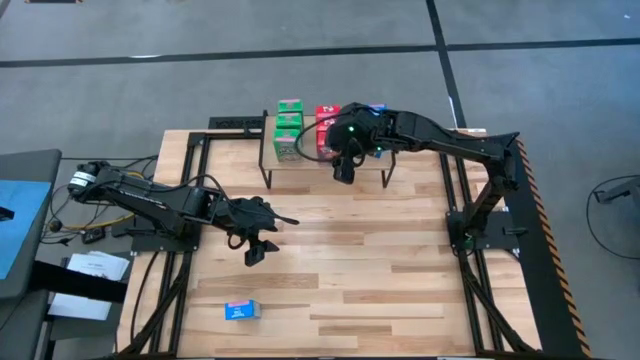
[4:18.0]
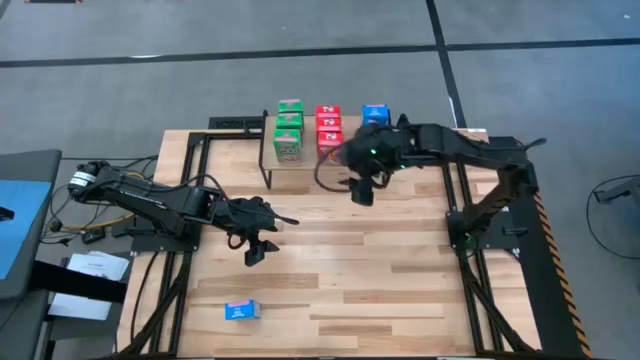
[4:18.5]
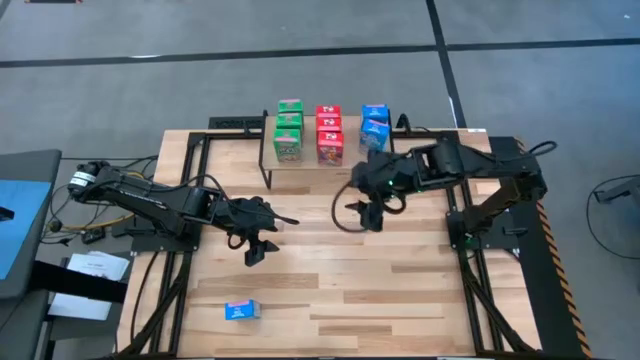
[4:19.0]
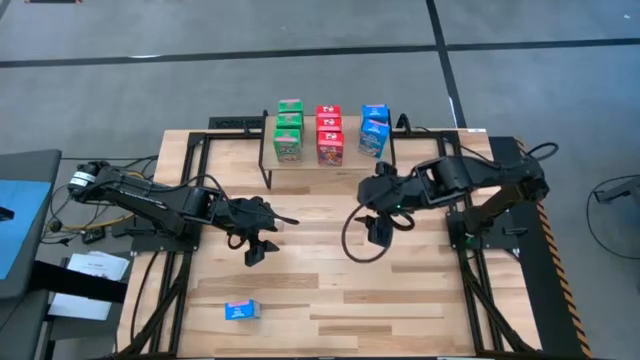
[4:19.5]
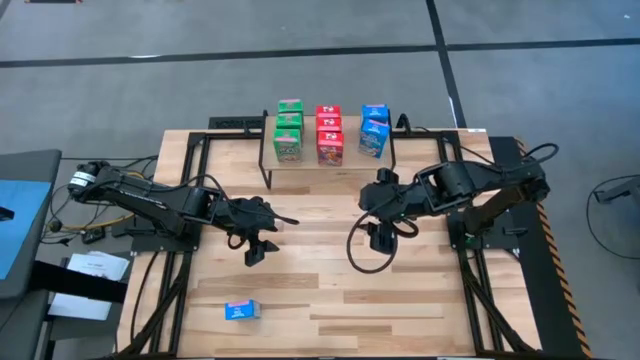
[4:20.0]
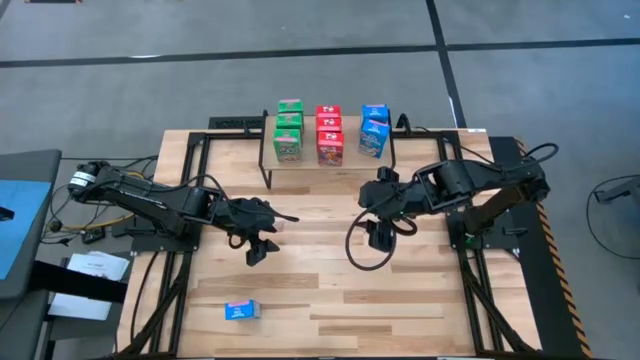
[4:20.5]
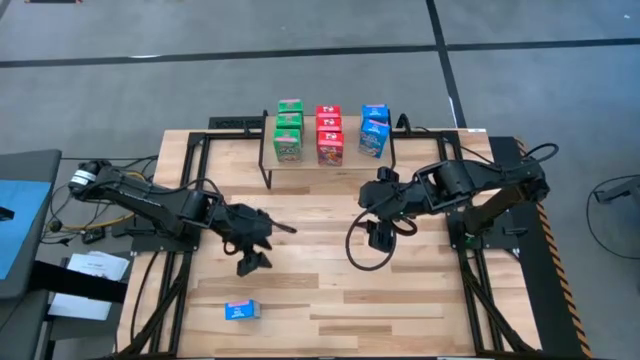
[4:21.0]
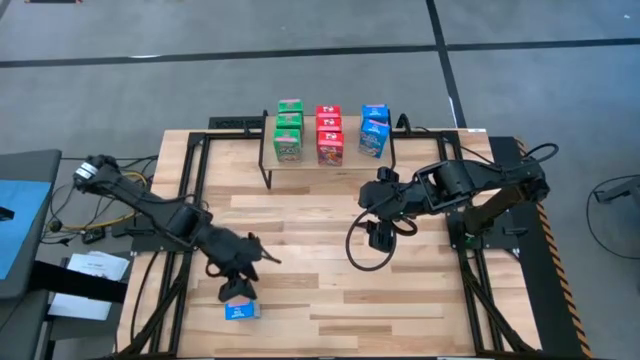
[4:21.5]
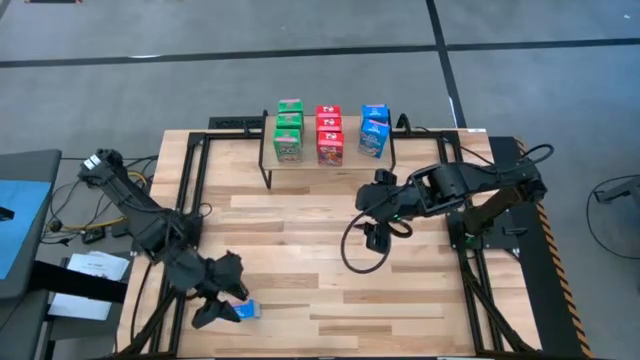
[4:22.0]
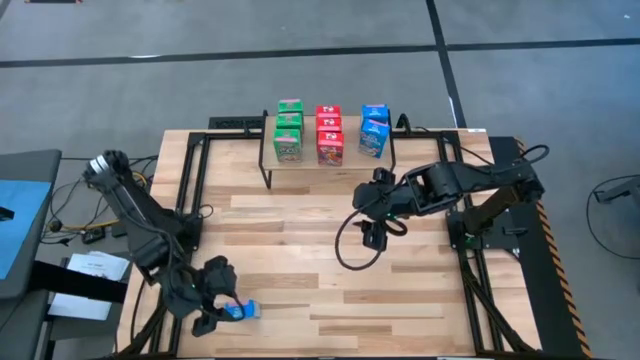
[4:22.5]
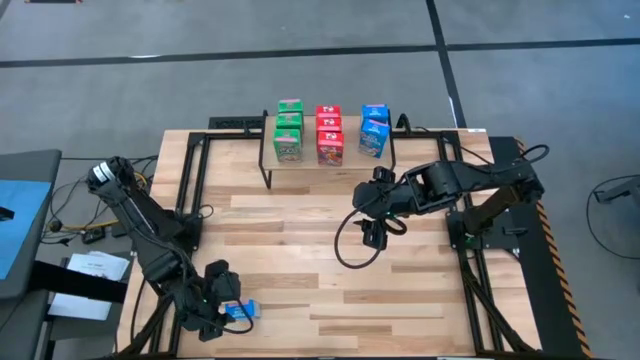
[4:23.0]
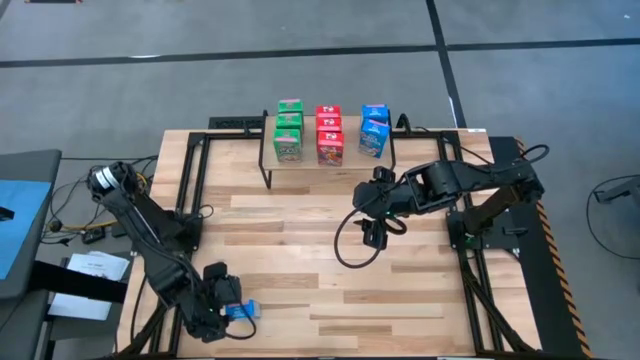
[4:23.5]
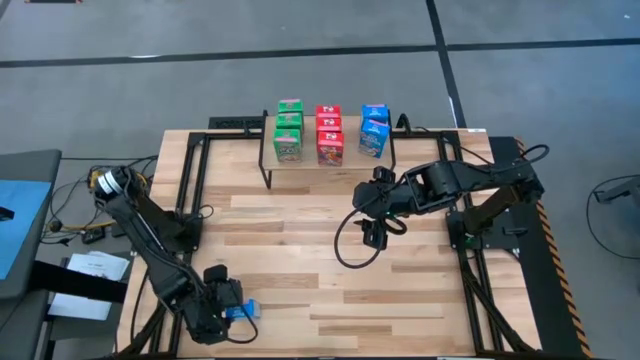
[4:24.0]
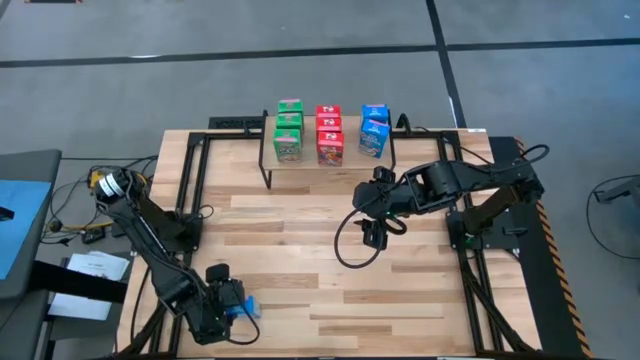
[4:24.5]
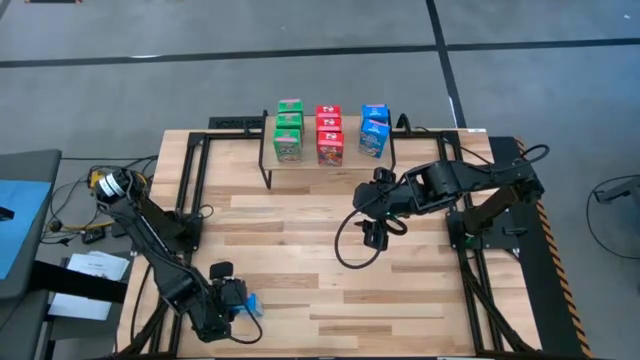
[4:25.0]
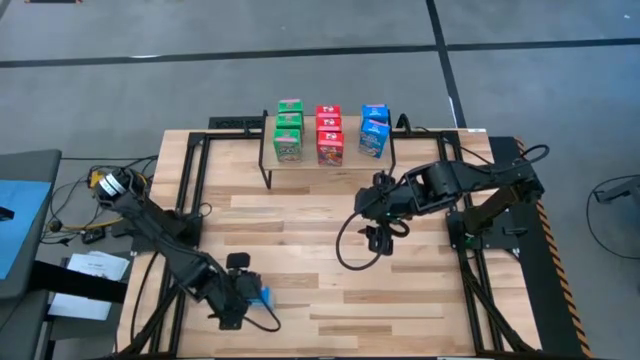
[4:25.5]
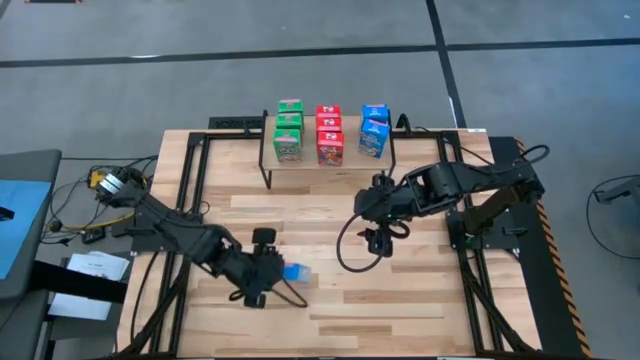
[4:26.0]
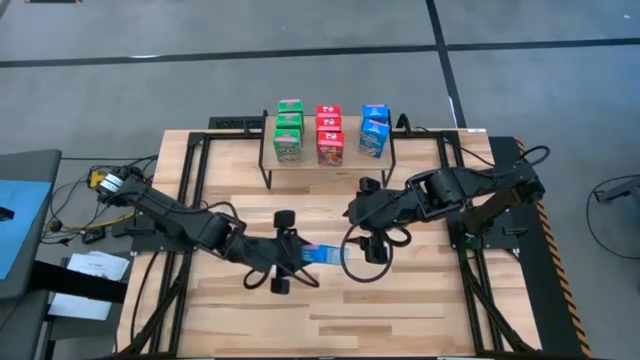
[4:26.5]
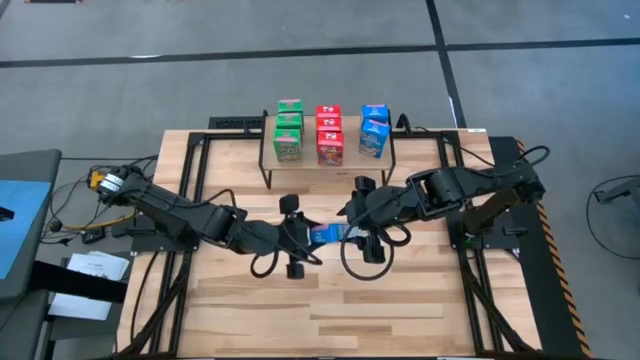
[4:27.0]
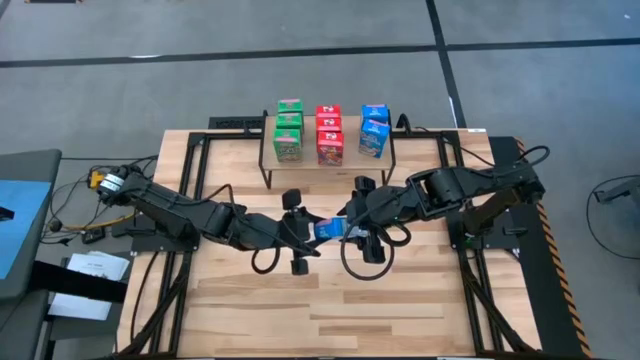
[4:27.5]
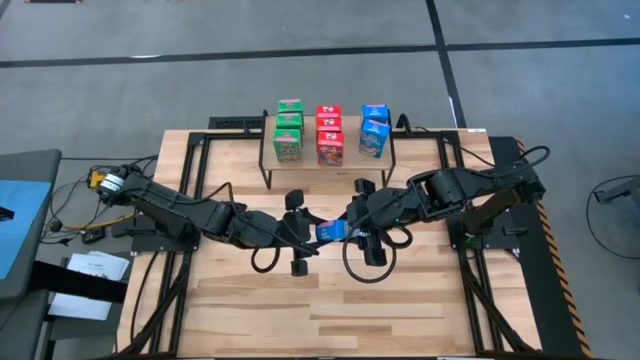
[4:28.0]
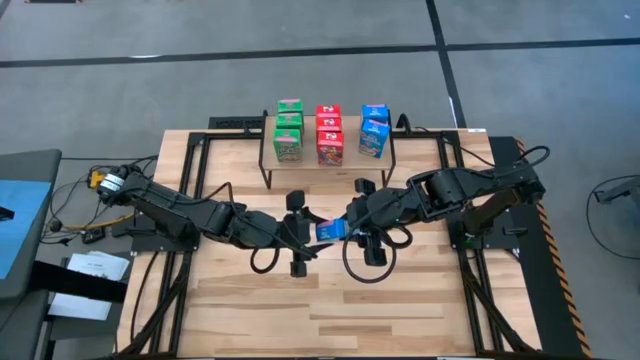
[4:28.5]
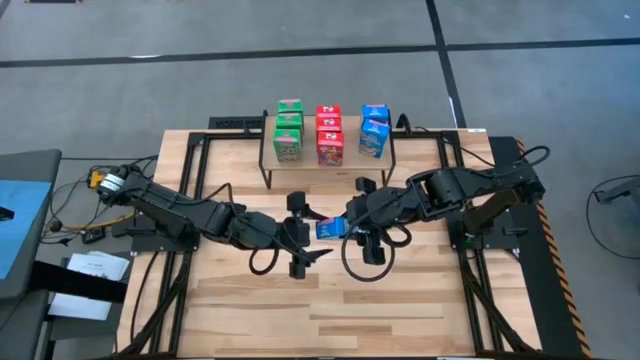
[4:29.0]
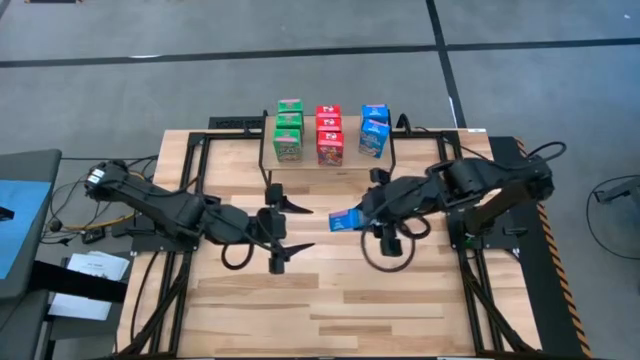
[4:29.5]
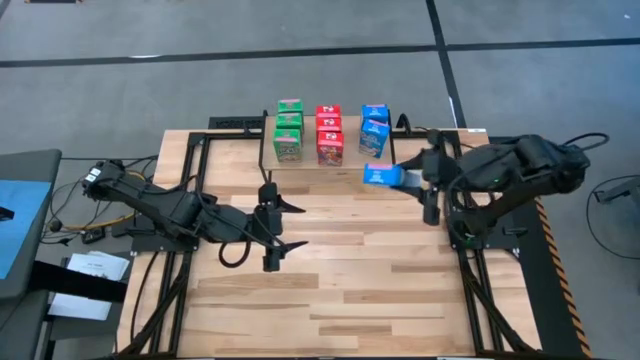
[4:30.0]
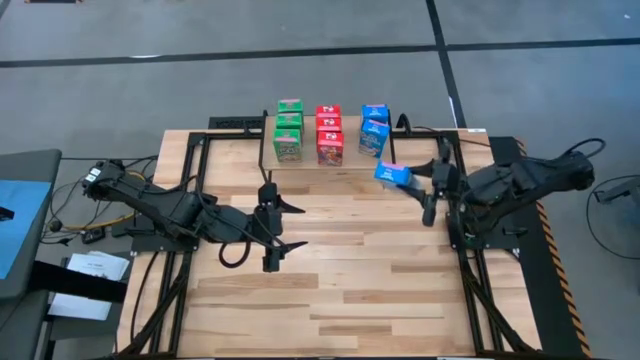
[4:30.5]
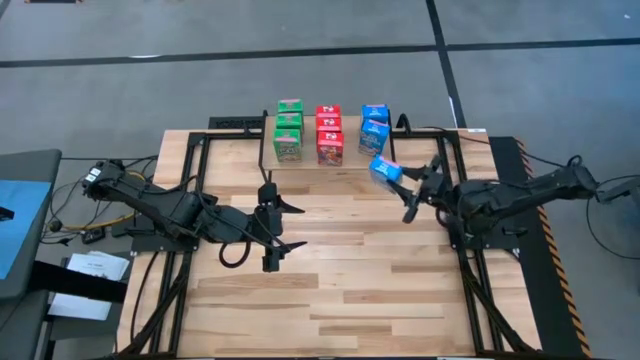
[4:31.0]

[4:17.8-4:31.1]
Task: Stack cereal on shelf
Put the blue cereal box on the shelf aligned with the other blue cereal boxes

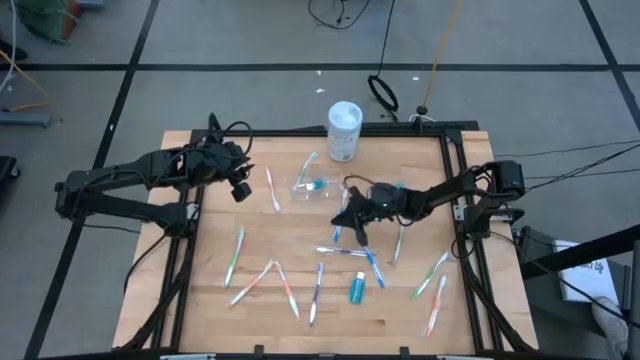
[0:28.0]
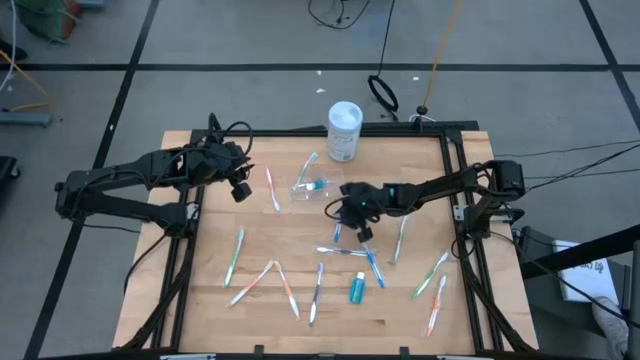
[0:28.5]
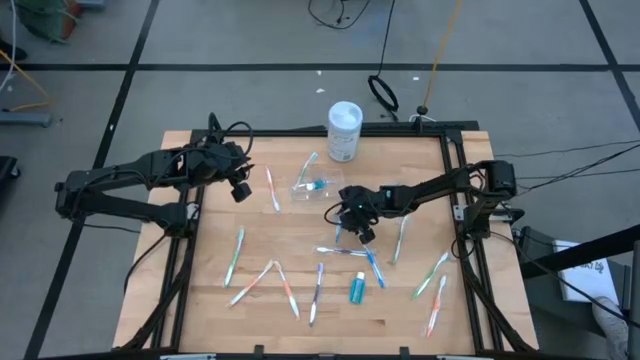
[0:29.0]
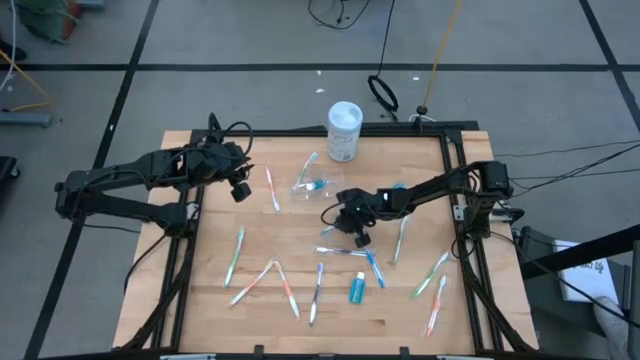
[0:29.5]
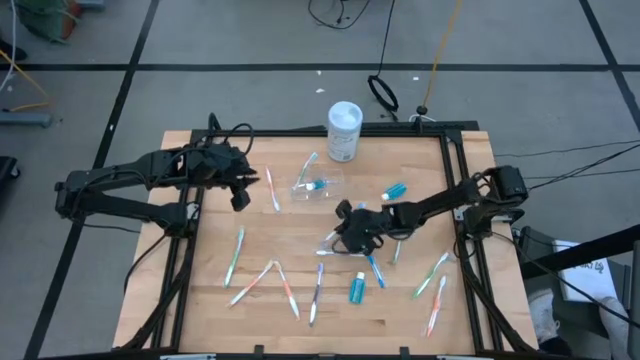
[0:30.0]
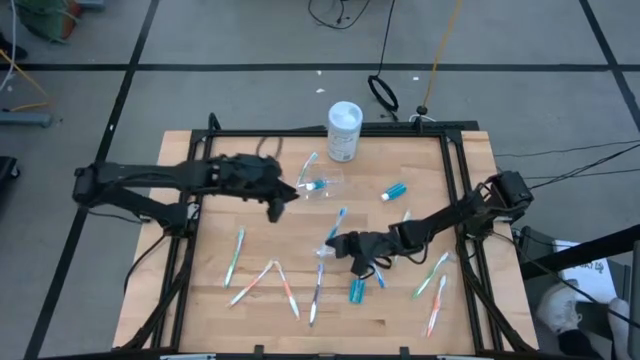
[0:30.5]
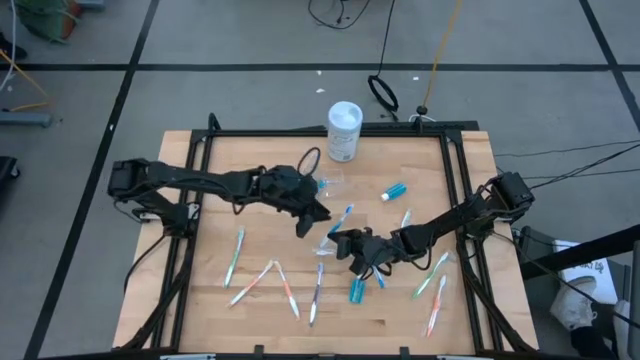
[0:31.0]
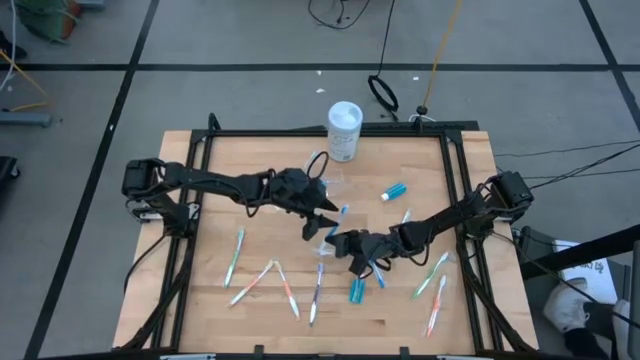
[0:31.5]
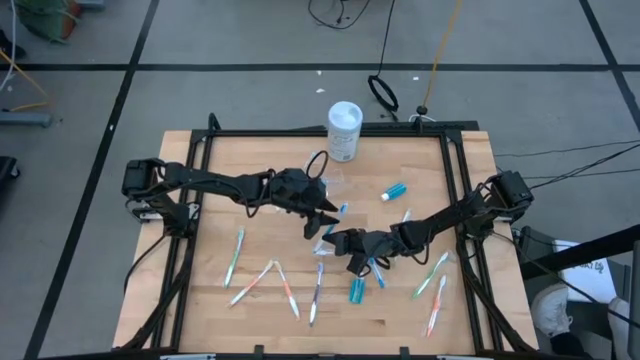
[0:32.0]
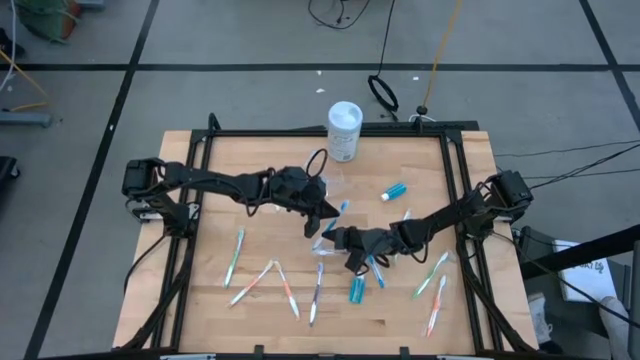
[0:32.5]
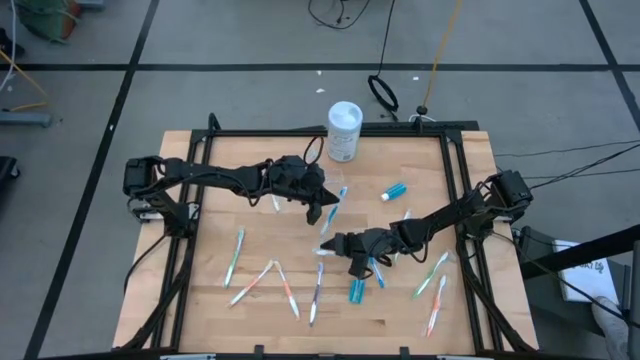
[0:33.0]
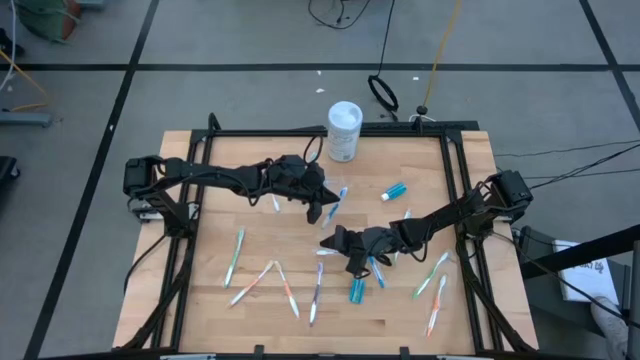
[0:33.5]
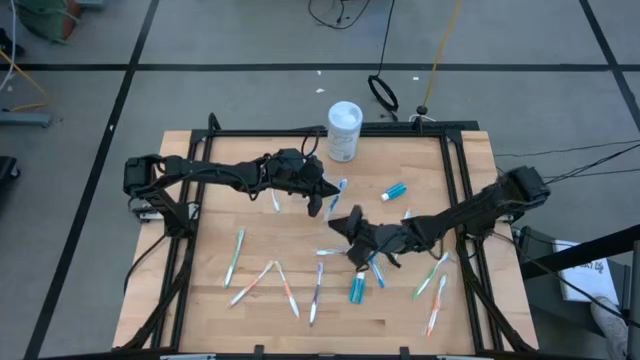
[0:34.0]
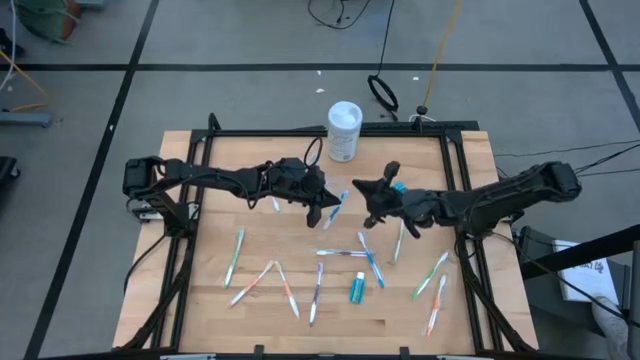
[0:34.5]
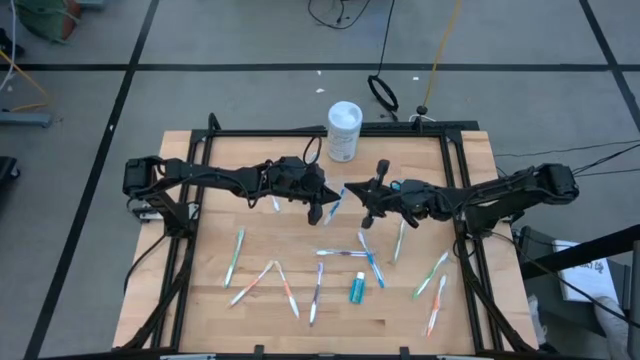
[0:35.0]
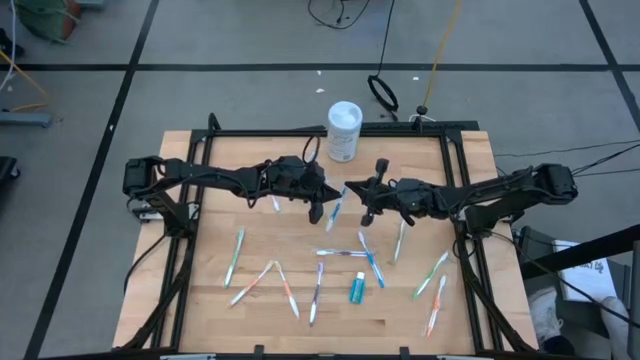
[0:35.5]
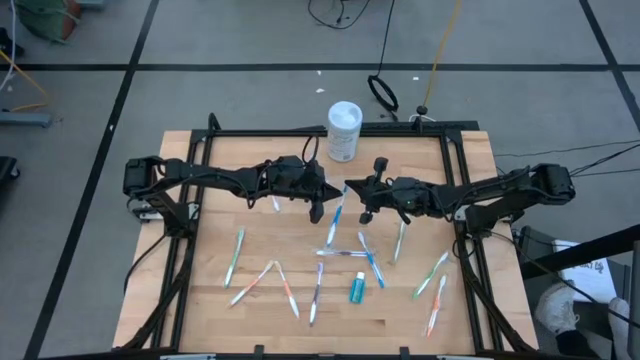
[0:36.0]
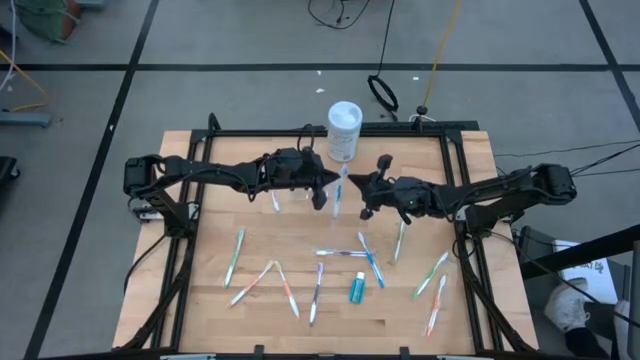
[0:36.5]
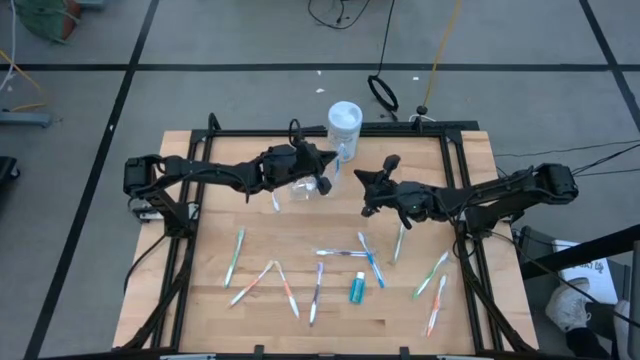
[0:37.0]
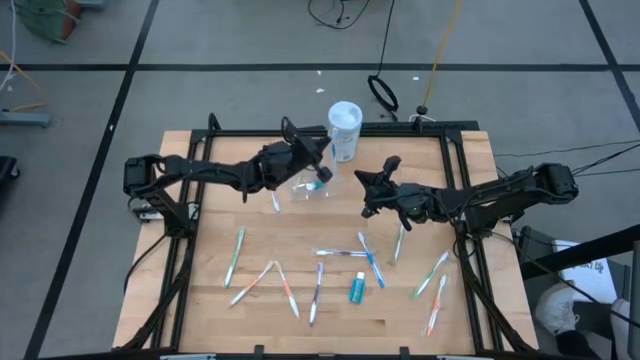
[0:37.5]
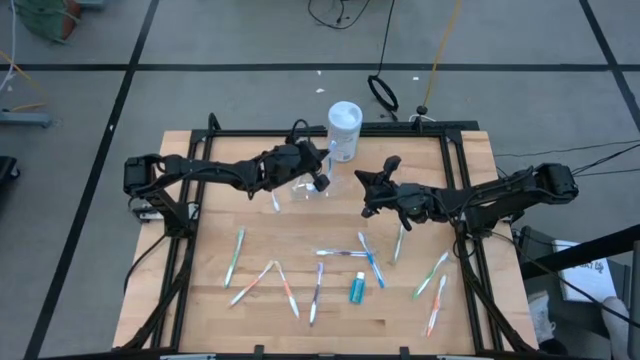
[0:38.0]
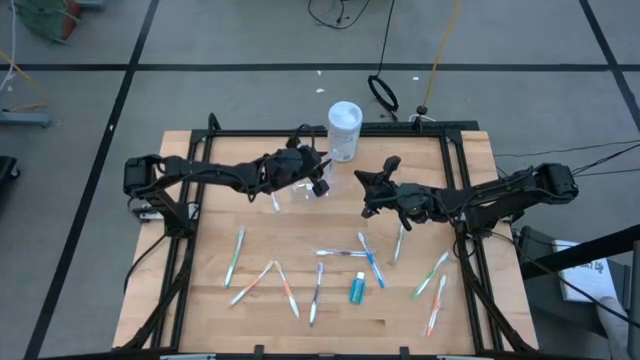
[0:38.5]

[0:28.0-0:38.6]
Task: Pick & Place toothbrushing station
Put the blue toothbrush into the transparent organizer
